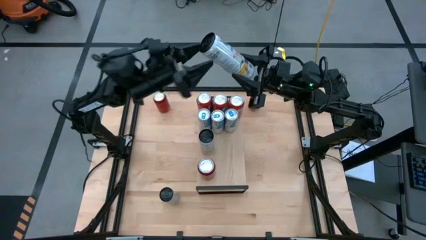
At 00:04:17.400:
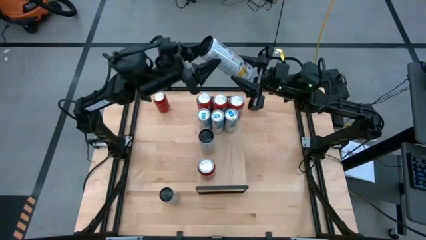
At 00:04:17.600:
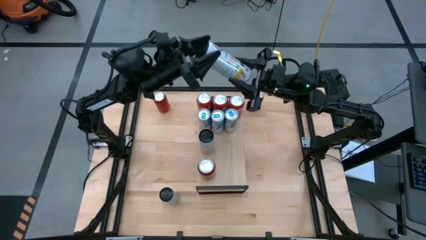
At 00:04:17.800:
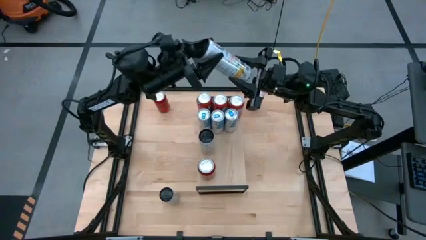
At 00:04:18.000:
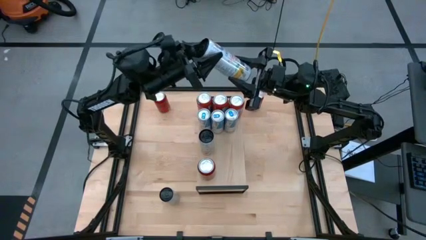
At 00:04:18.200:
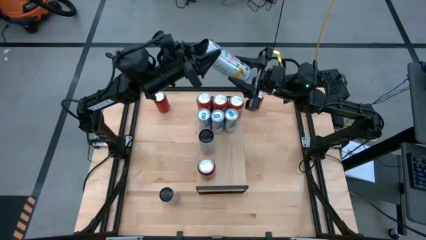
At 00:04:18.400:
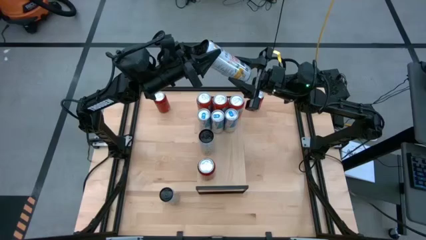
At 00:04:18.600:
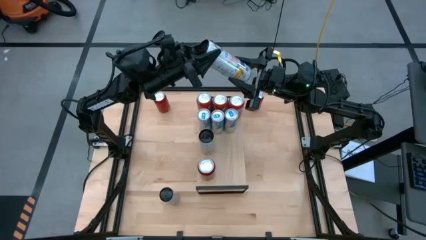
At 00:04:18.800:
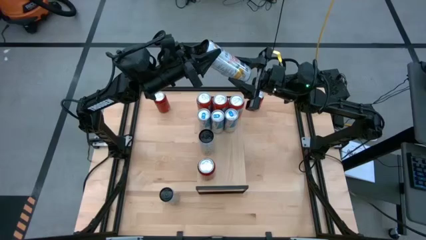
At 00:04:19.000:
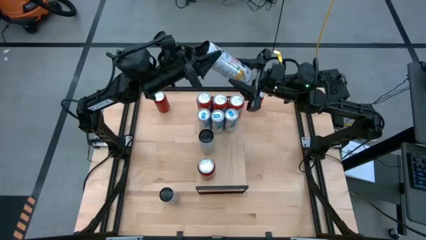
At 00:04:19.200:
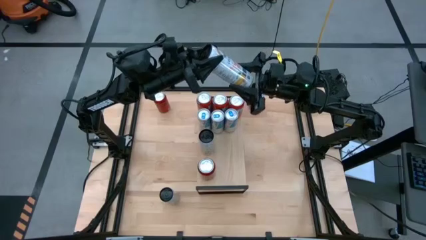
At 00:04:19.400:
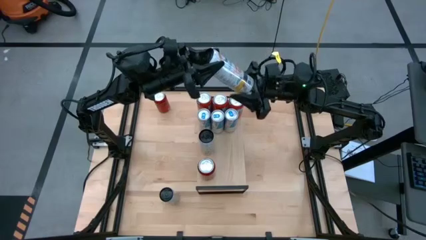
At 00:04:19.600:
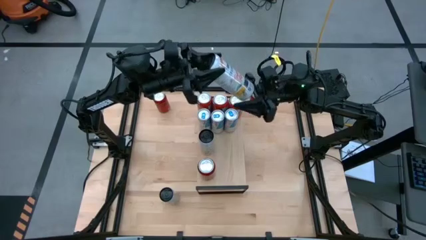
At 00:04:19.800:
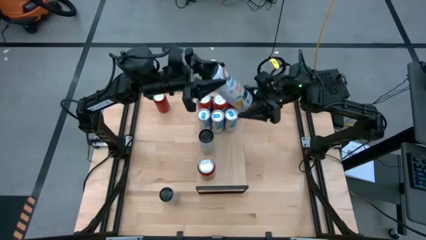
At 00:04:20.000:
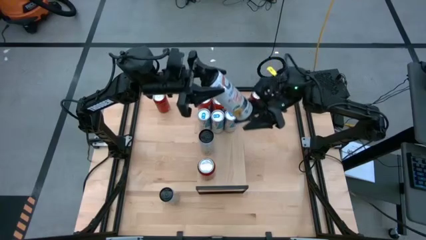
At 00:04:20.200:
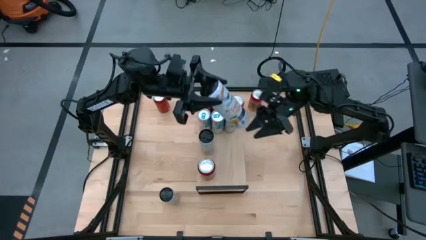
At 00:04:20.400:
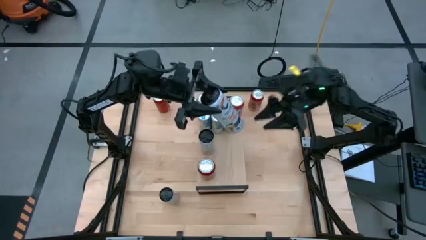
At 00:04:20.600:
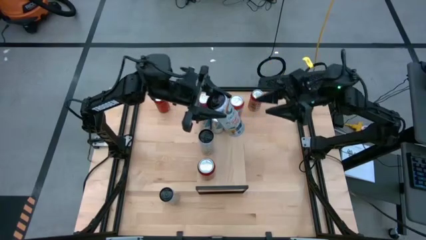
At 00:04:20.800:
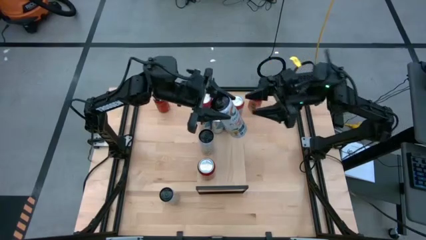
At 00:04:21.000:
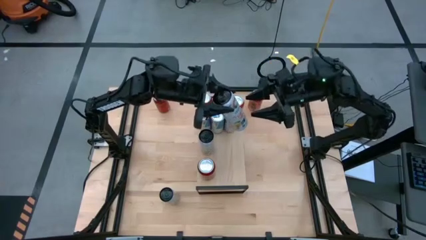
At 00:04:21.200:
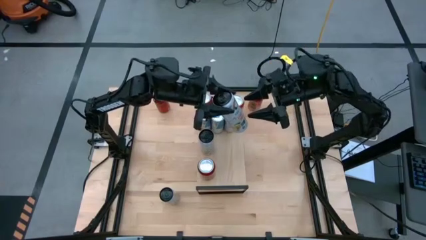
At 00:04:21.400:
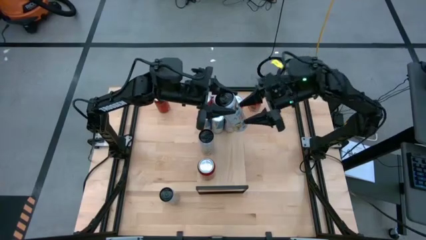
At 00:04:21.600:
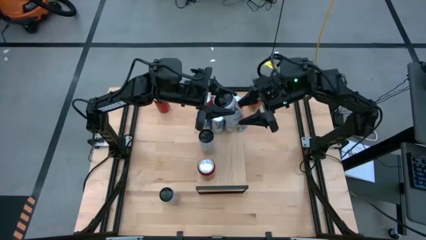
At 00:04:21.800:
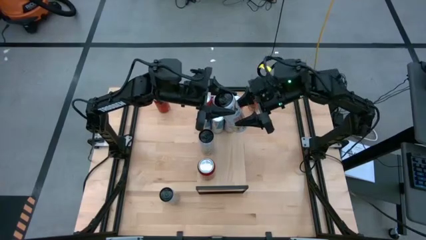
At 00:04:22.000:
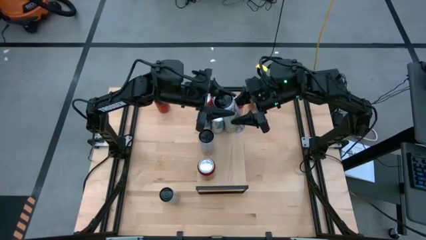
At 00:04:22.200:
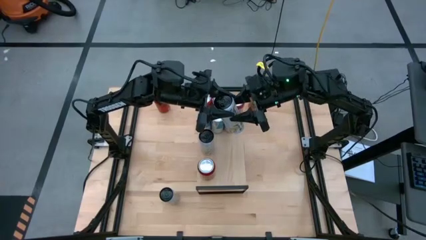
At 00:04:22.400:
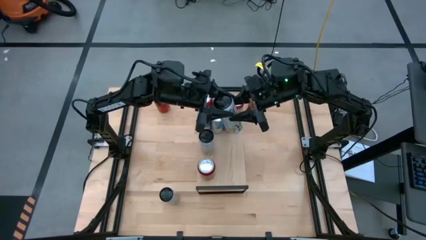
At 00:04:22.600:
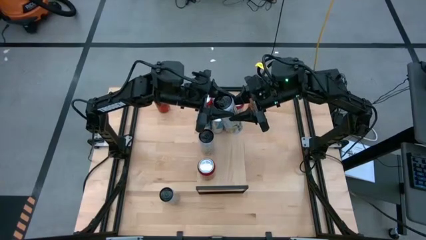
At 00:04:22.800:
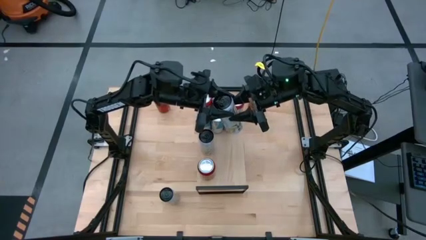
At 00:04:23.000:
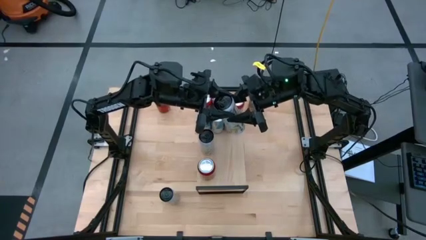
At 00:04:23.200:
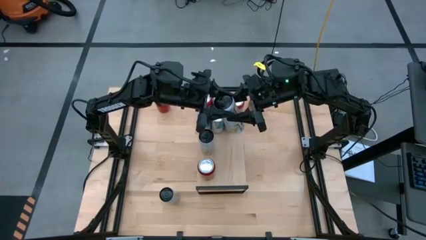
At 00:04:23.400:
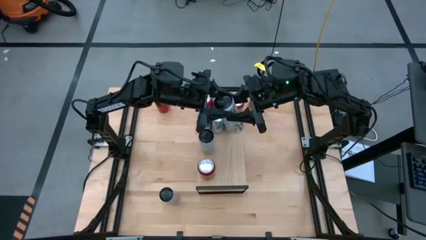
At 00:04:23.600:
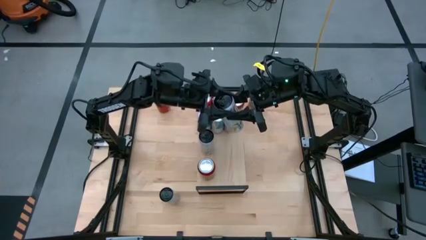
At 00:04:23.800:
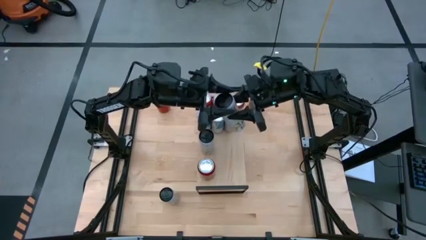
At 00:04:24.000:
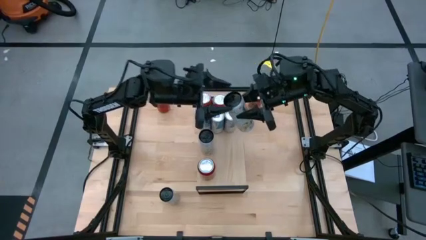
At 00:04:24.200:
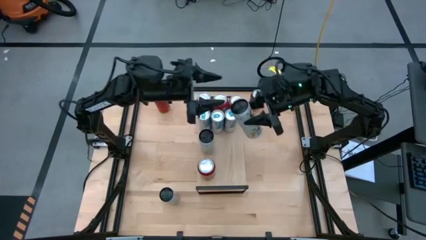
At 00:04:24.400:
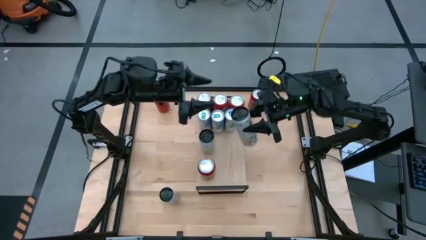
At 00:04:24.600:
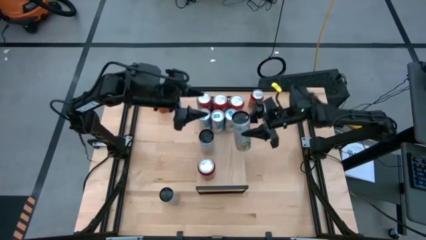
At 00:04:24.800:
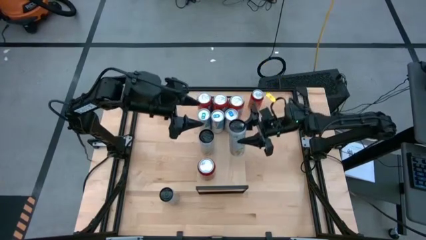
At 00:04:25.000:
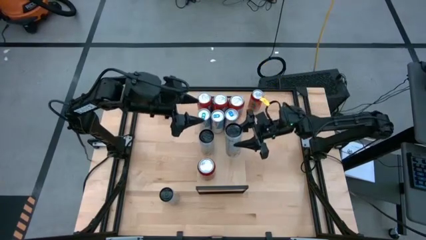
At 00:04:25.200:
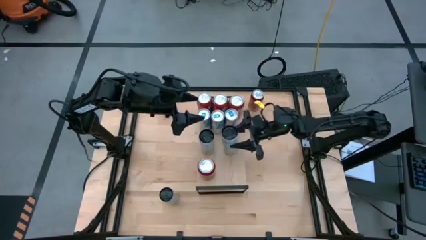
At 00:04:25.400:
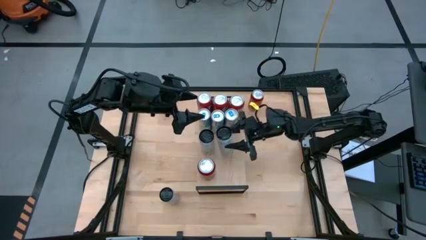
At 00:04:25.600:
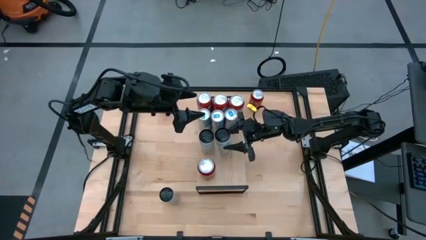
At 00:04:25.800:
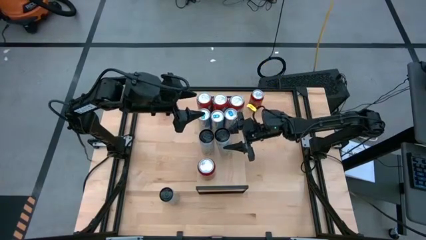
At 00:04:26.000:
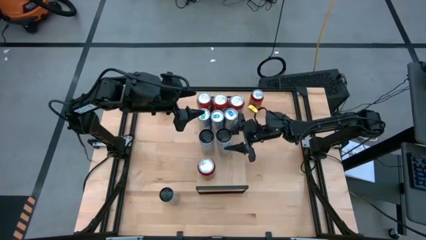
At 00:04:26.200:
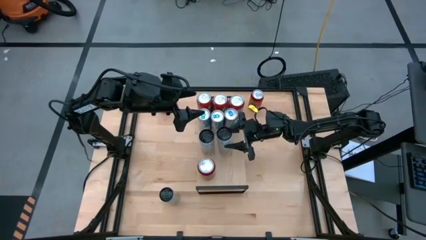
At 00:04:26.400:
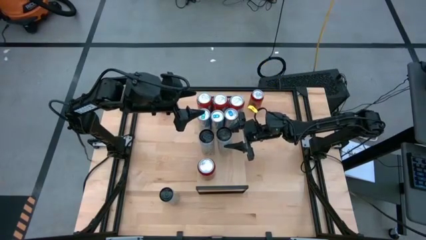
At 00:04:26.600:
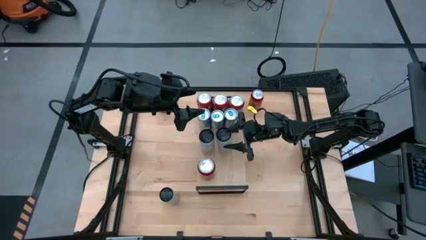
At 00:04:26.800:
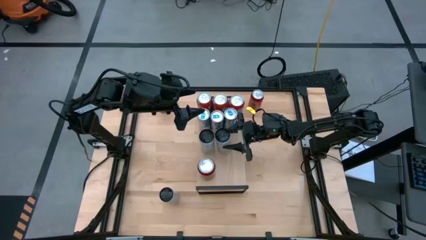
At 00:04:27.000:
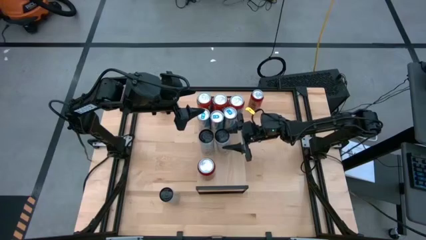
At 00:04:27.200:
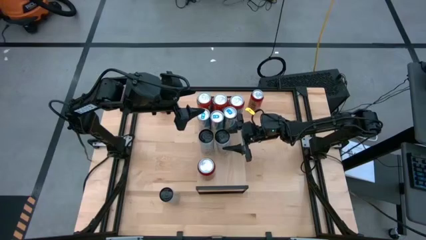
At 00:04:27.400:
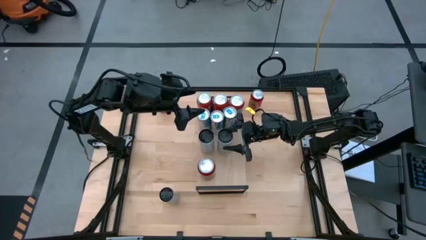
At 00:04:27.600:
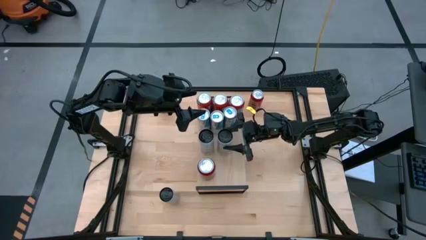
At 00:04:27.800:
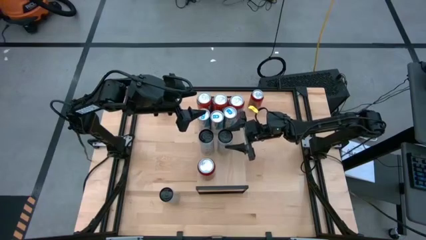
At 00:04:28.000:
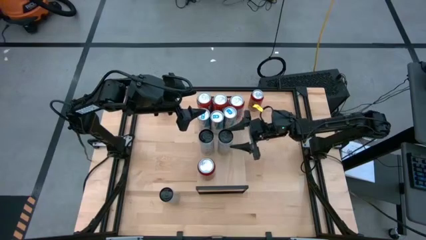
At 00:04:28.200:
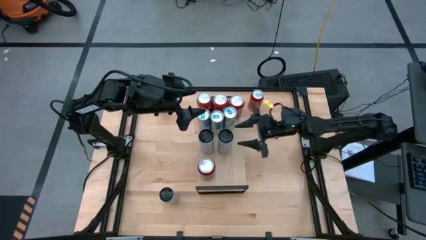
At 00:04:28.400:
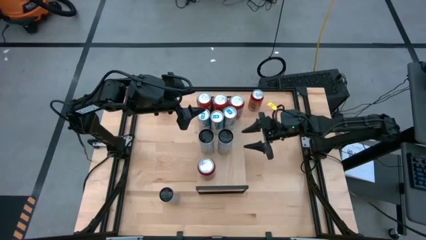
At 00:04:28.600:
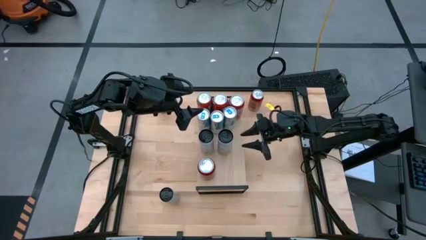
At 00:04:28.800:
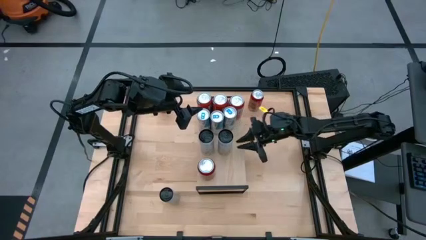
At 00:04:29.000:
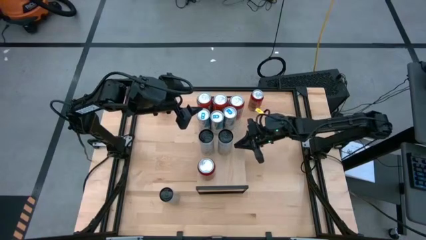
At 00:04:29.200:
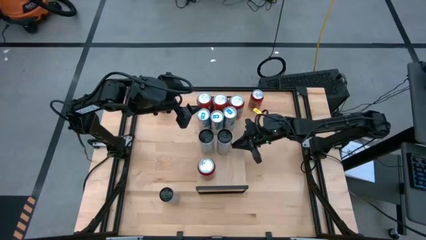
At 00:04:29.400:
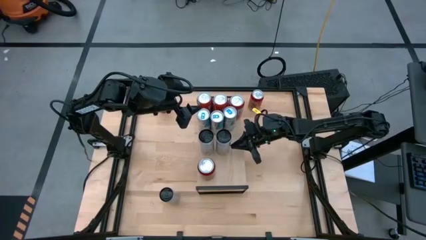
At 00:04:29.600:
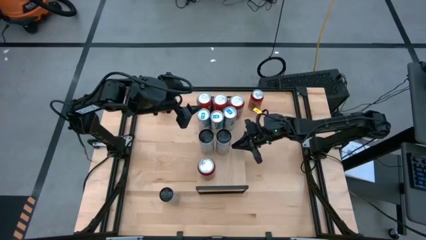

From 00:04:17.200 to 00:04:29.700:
Task: Place canned beverage on shelf
Put the top white and yellow soda can on the shelf aligned with the other white and yellow soda can

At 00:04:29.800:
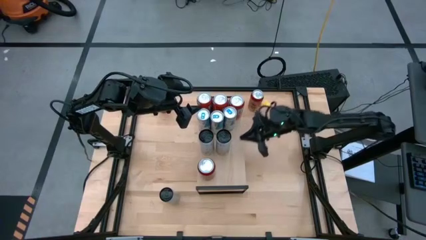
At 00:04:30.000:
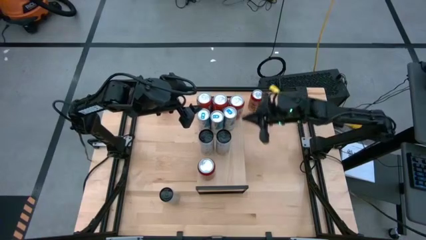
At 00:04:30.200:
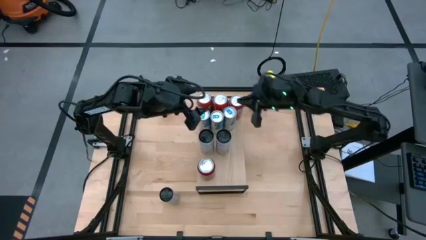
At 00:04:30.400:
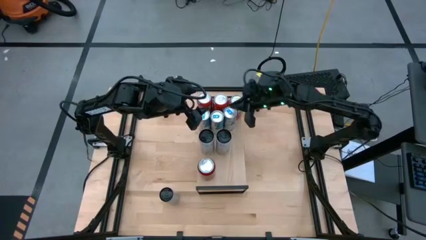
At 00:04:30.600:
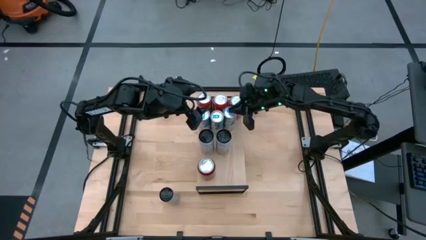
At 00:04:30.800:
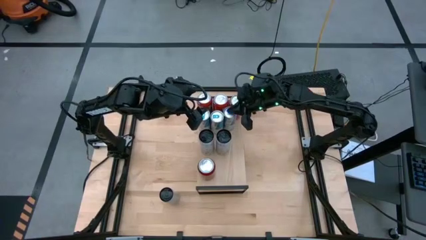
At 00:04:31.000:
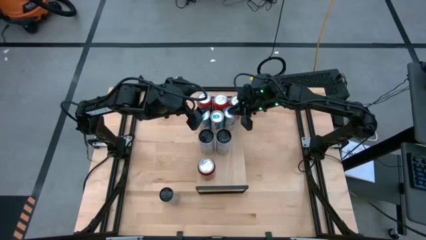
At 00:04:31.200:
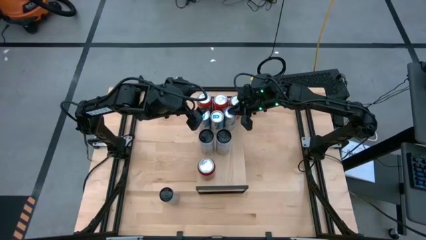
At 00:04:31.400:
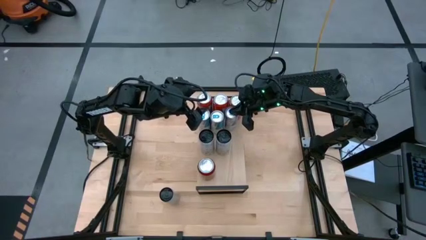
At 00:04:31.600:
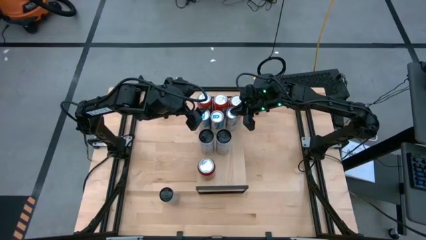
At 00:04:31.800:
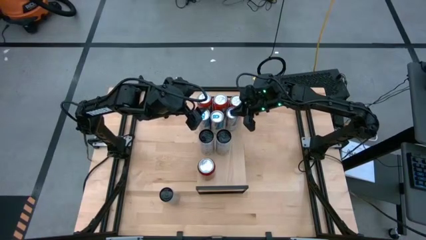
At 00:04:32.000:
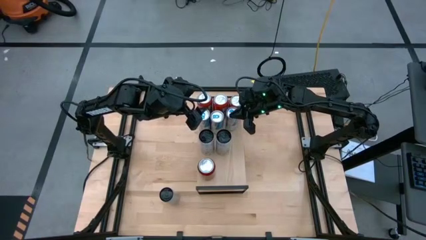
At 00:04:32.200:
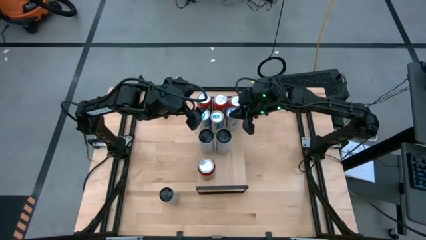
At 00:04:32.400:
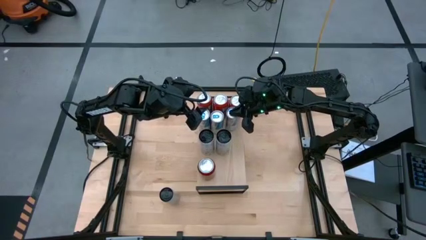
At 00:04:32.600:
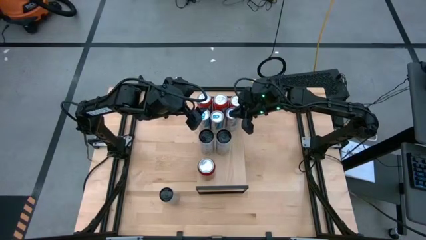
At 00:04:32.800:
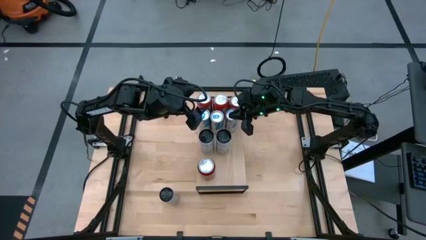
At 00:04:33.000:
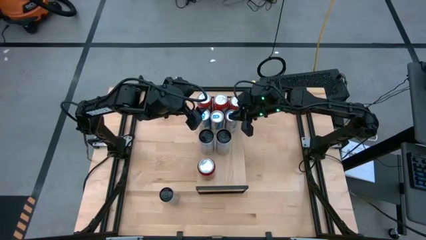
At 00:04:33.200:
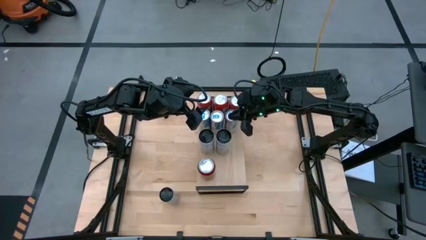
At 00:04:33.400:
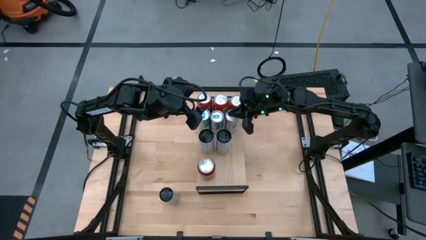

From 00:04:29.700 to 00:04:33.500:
Adjust the blue soda can
